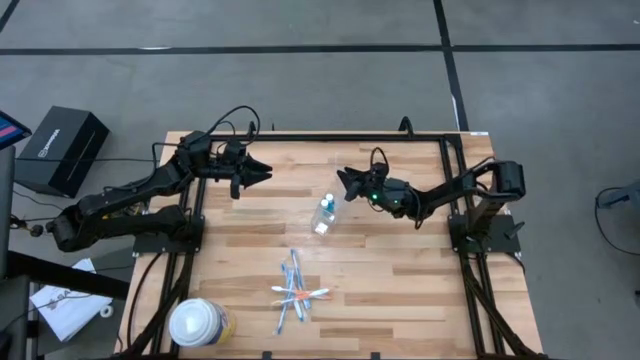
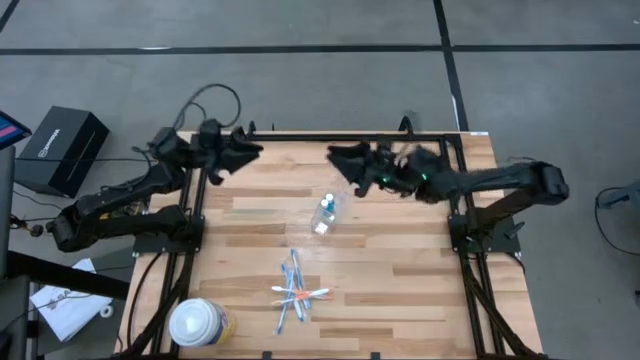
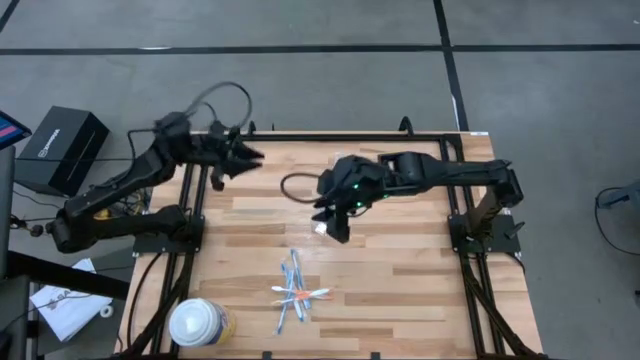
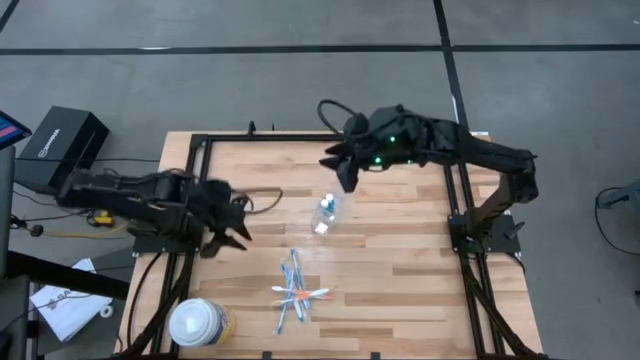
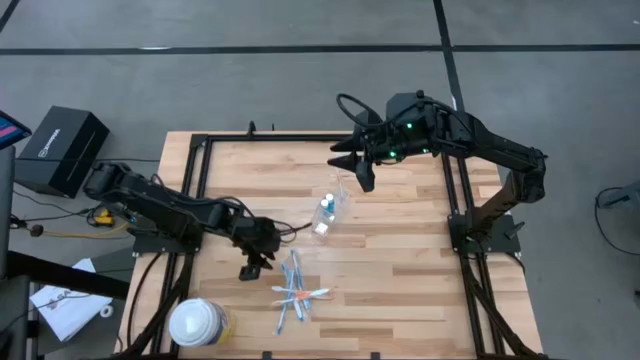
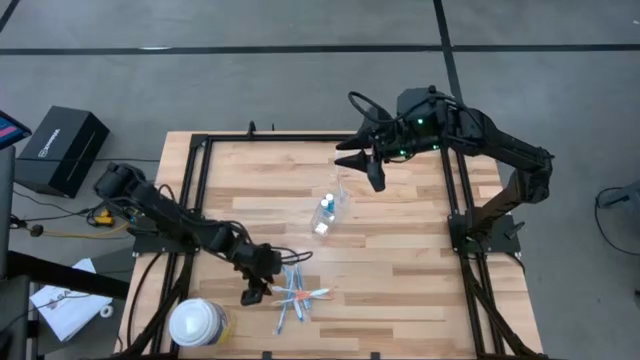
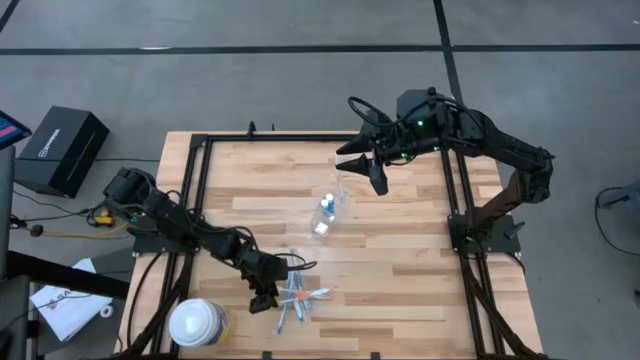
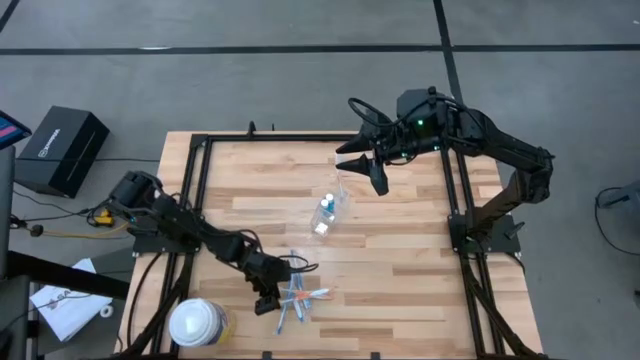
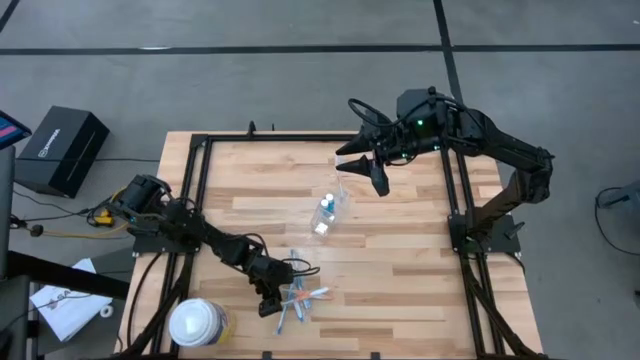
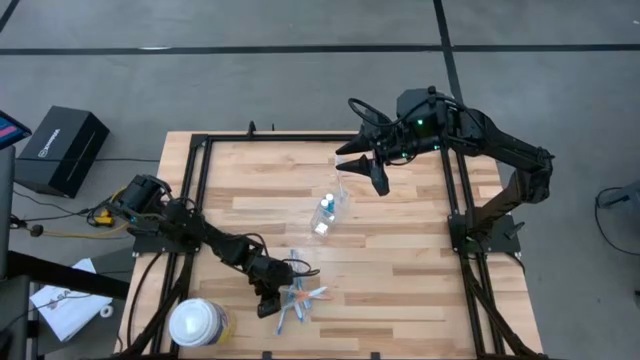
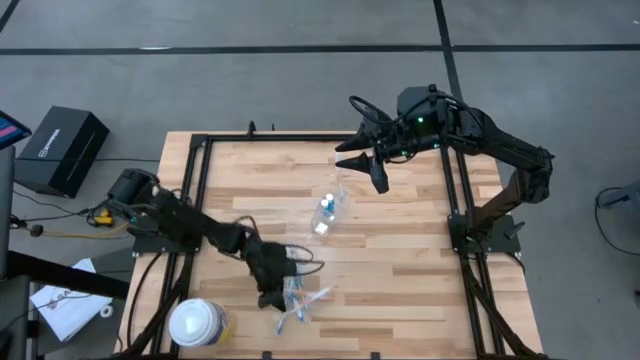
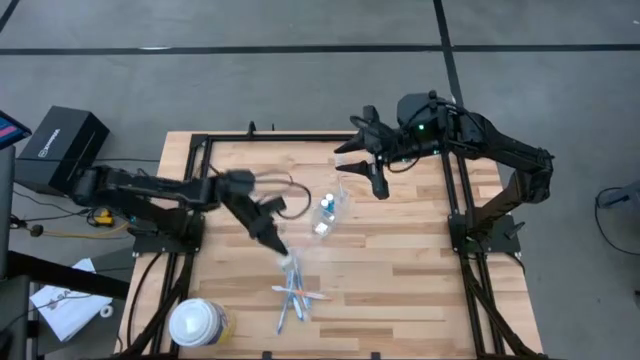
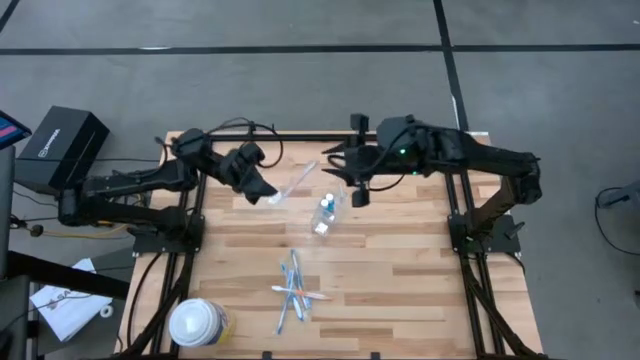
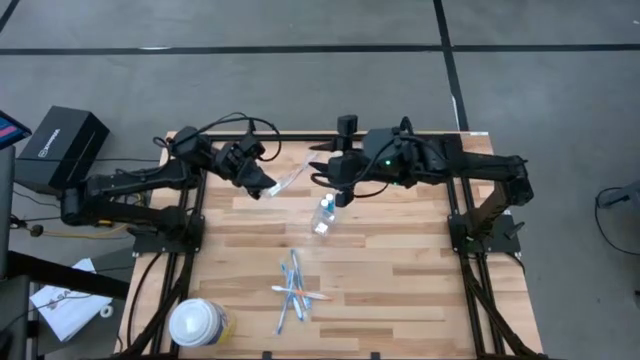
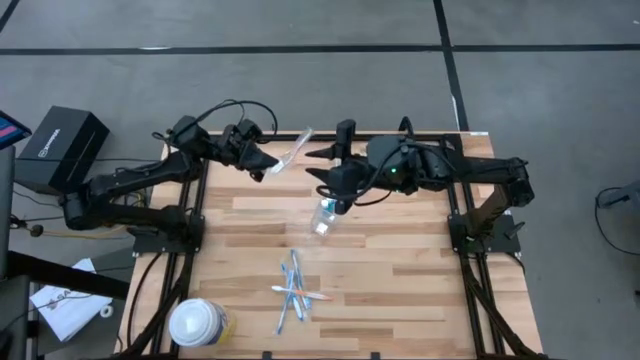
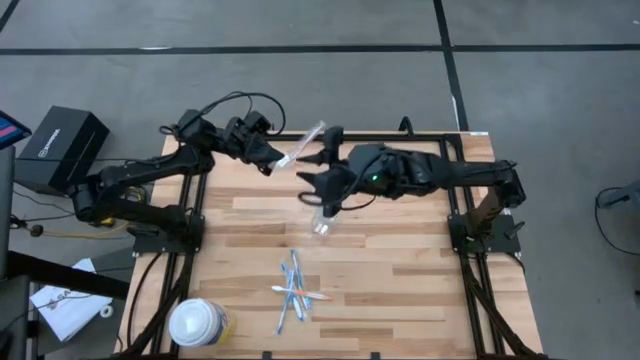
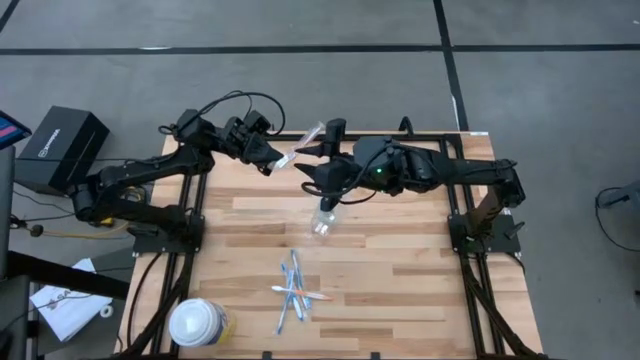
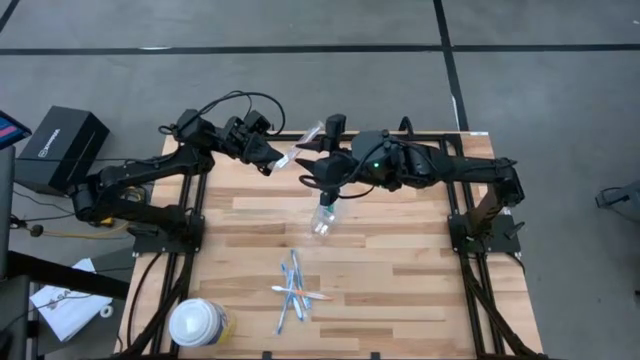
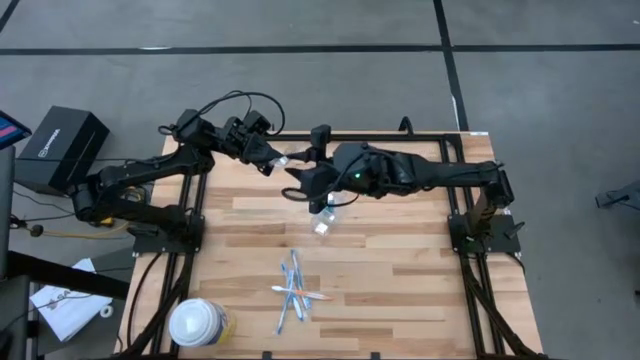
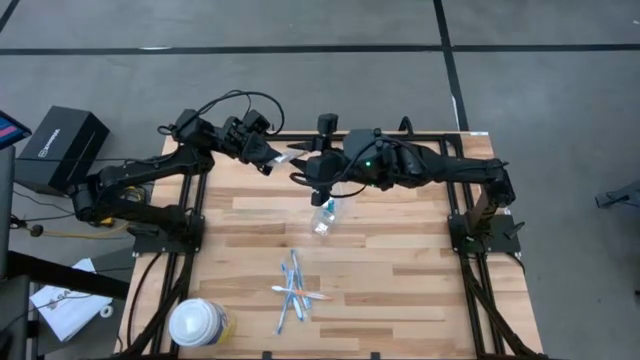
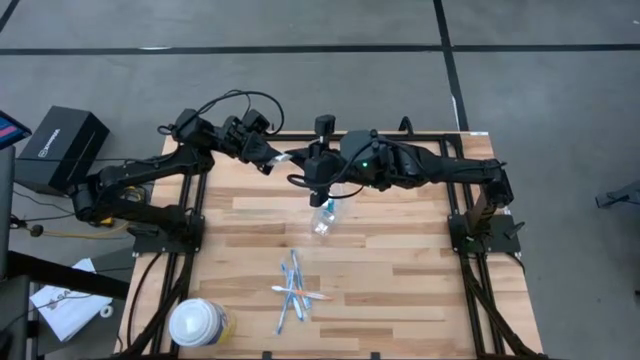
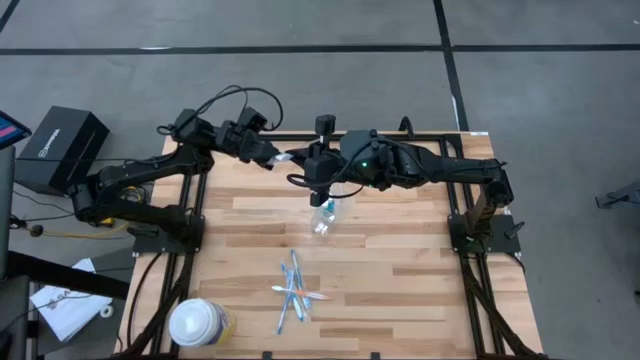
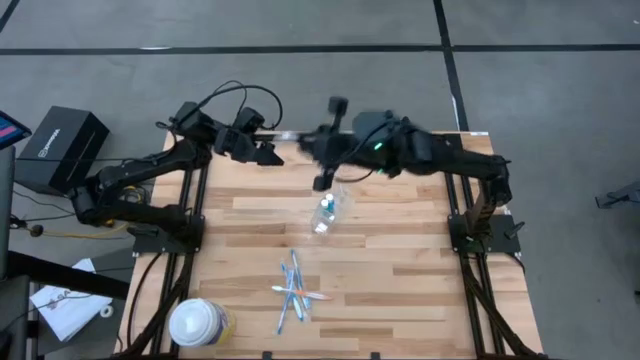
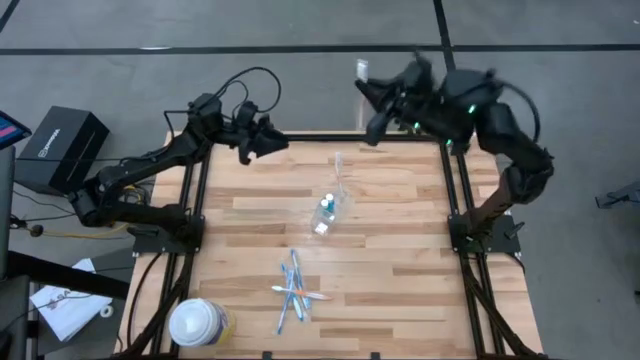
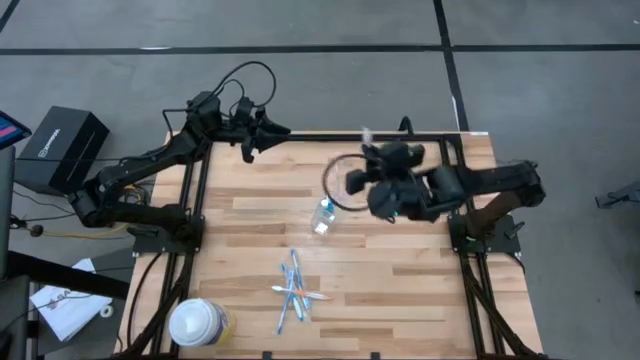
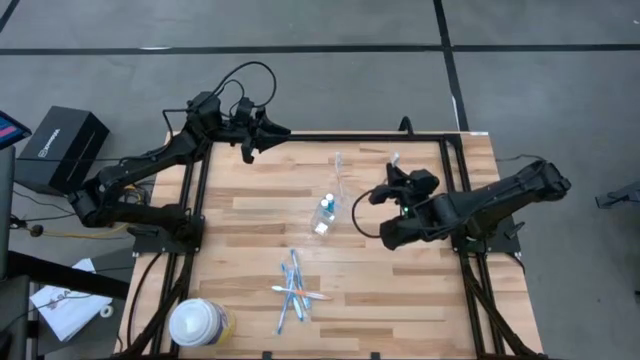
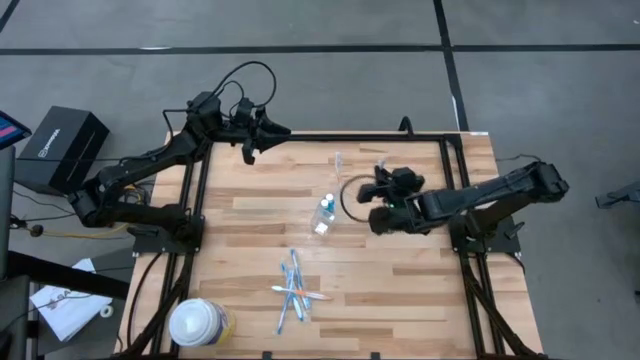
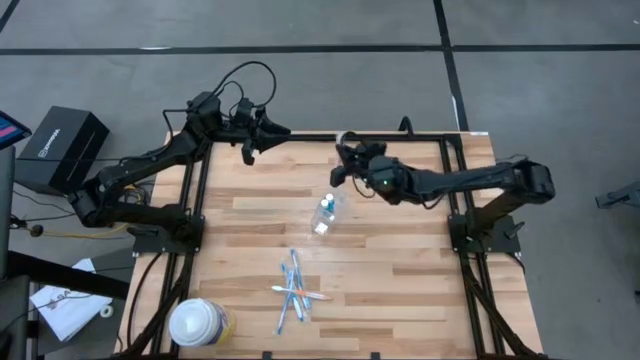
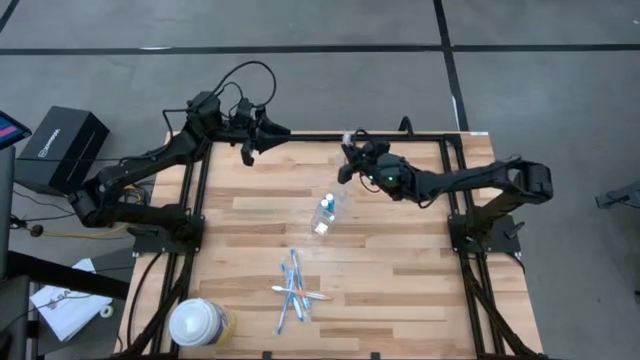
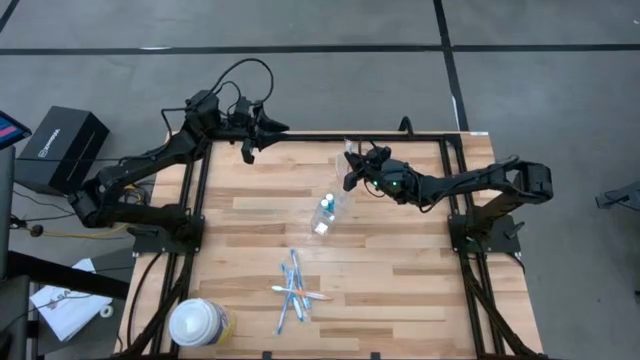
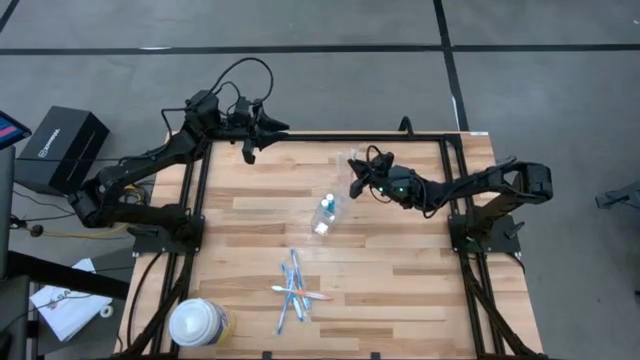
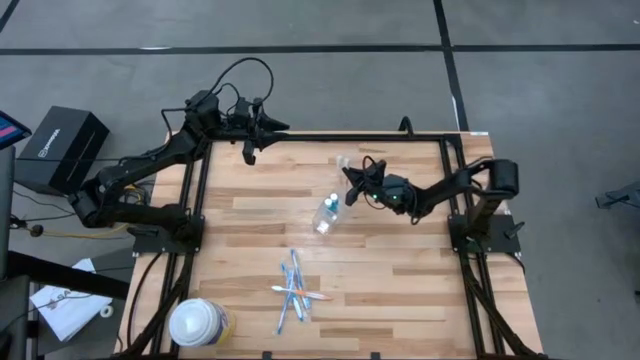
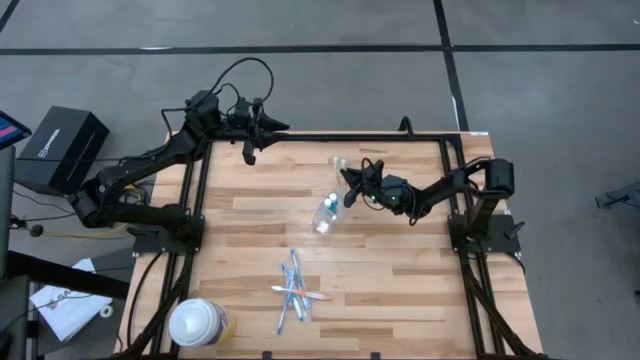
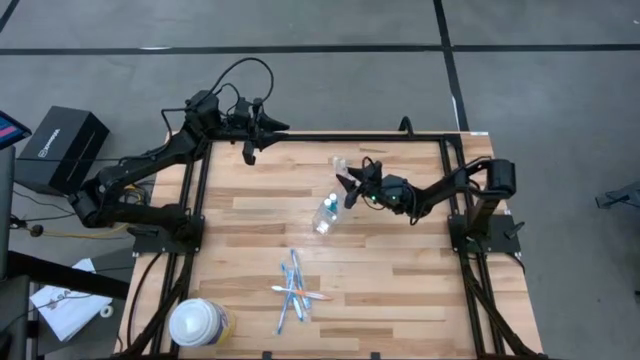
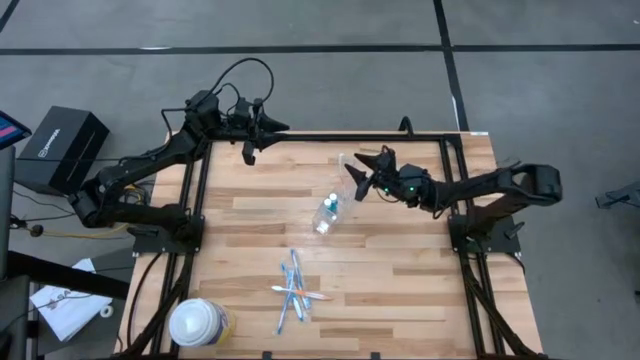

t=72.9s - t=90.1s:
Task: Pick & Place toothbrushing station
Put the bottom orange toothbrush into the right section of the transparent organizer

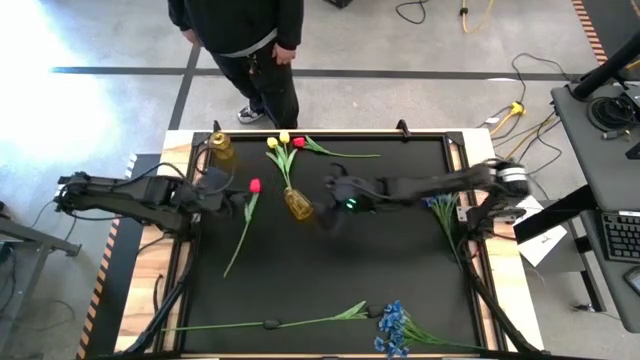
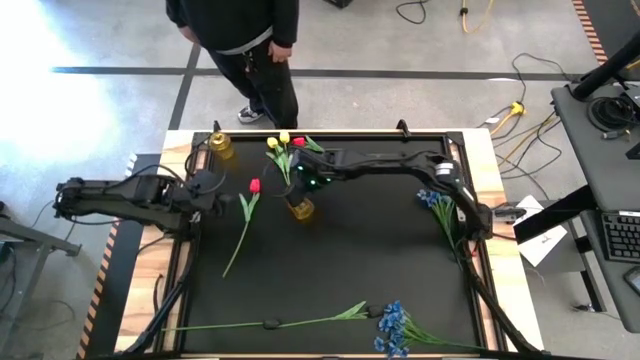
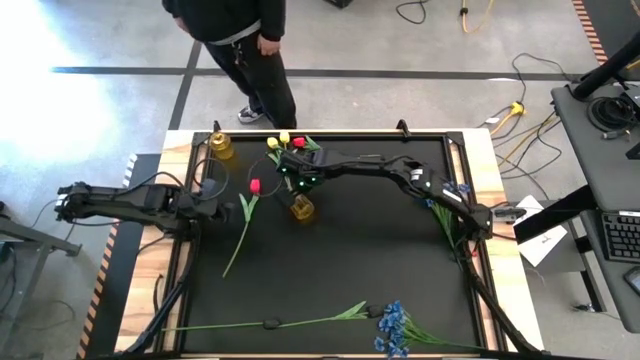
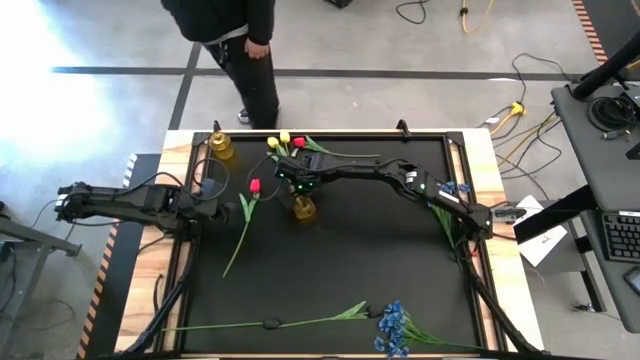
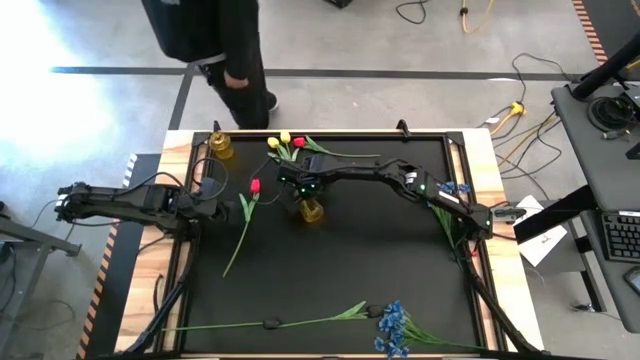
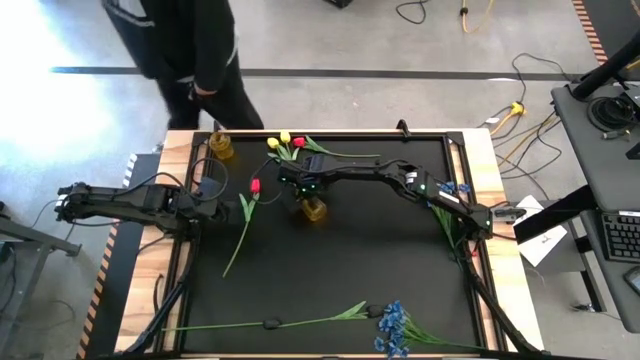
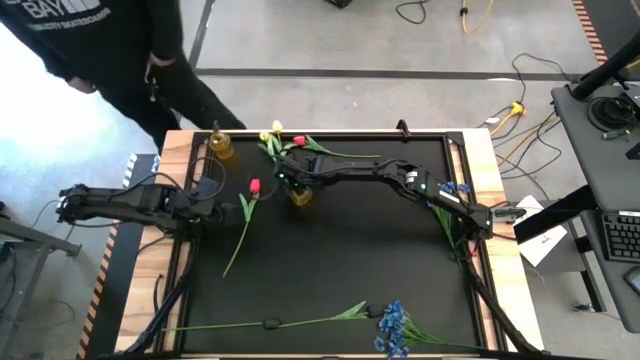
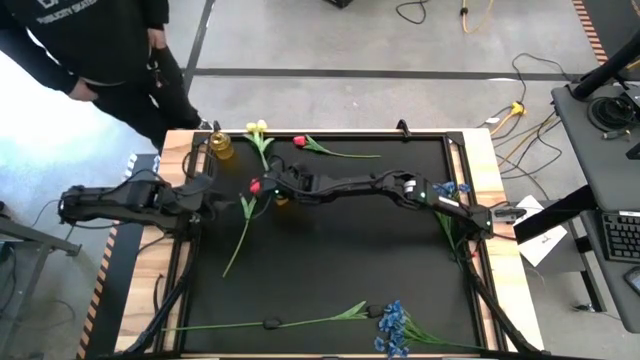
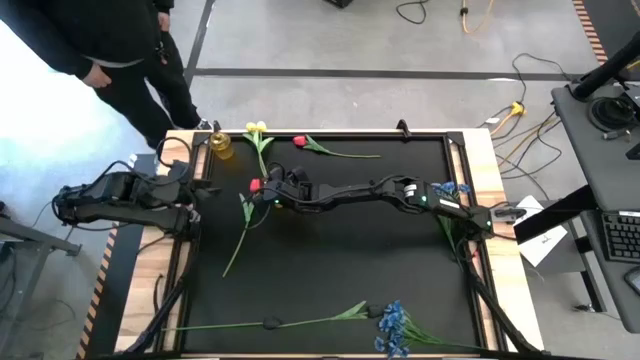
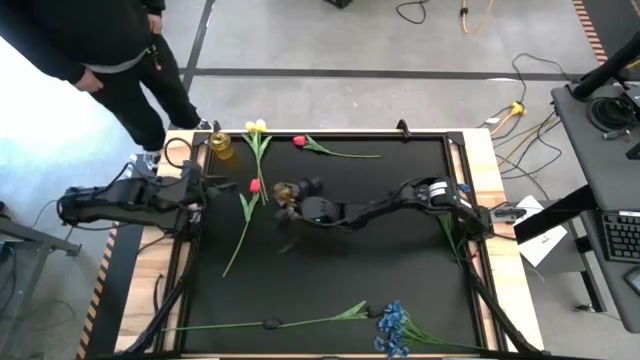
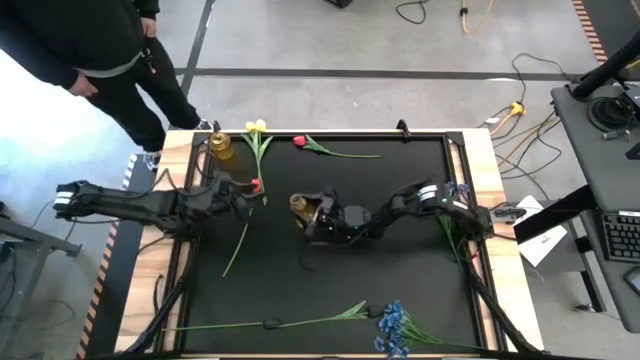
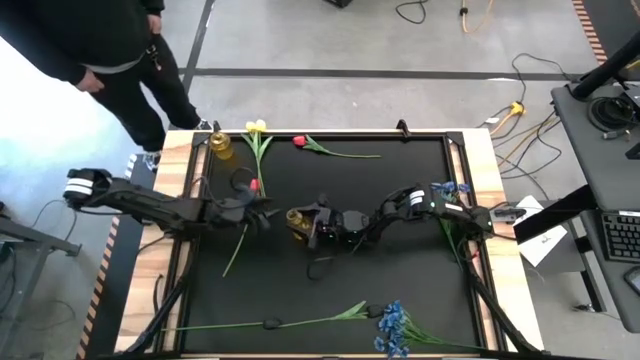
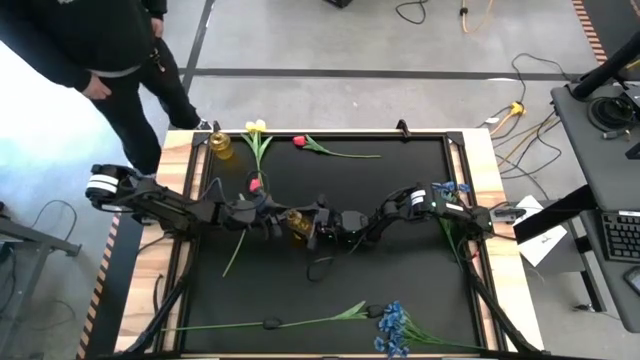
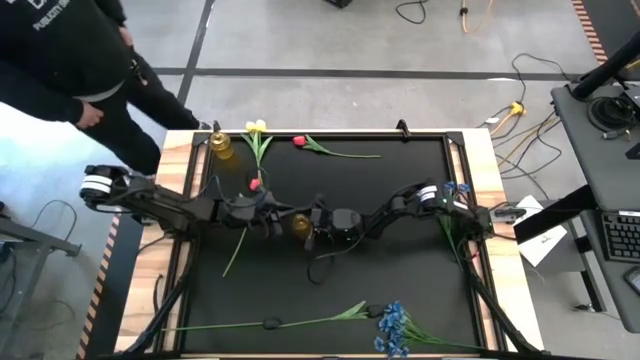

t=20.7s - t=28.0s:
Task: Sort flowers into vase by color
Adjust the bottom yellow vase
